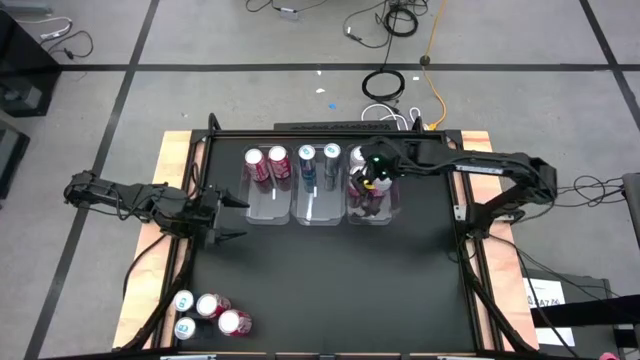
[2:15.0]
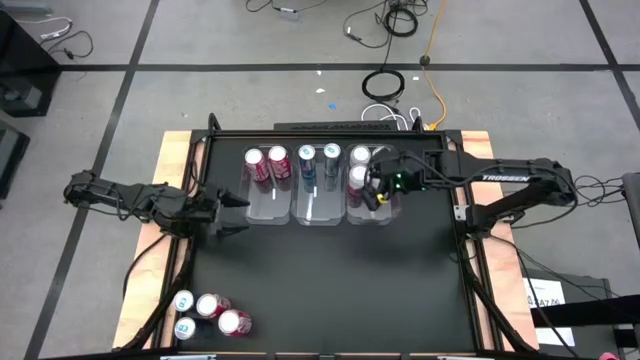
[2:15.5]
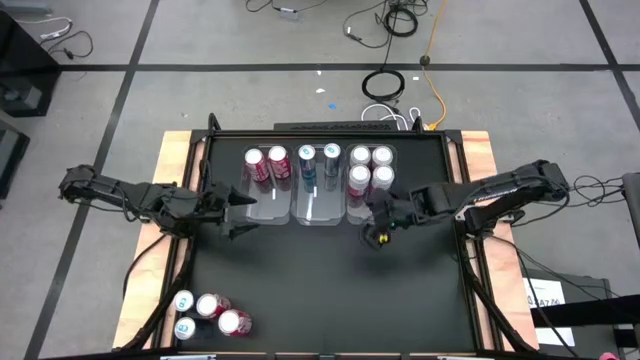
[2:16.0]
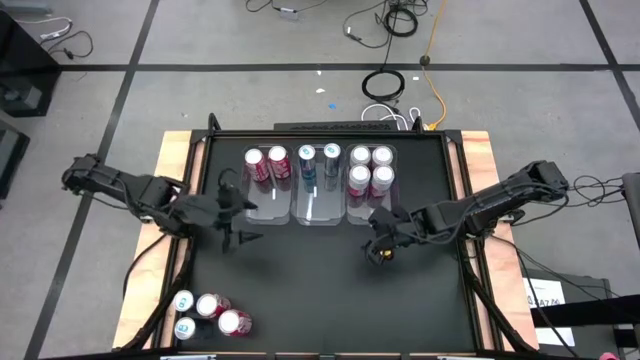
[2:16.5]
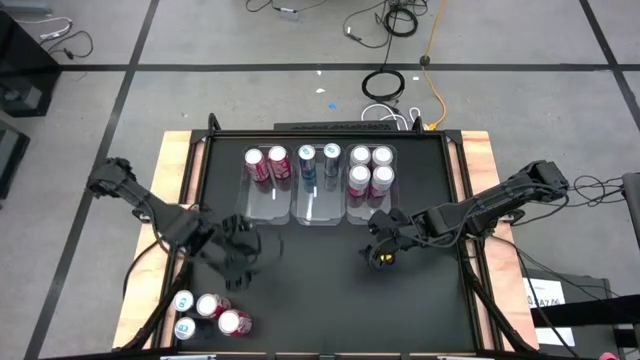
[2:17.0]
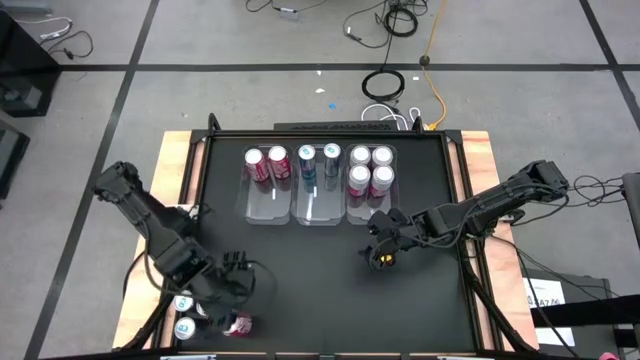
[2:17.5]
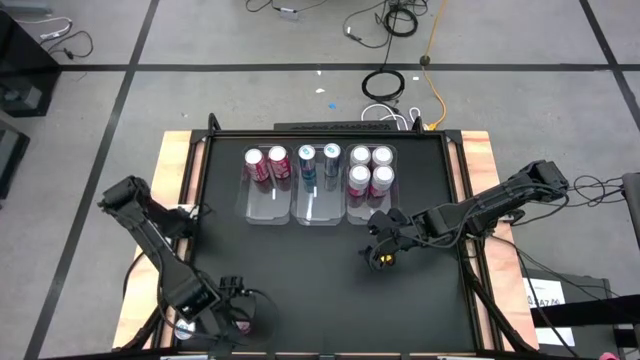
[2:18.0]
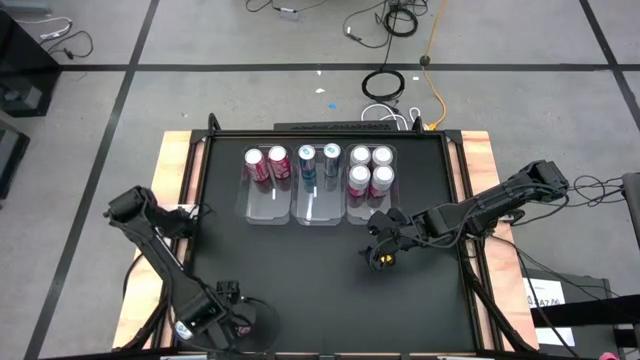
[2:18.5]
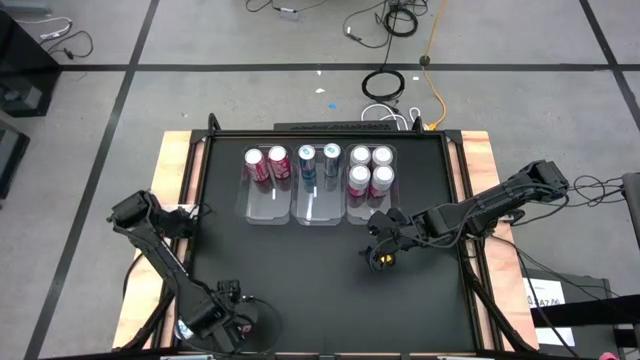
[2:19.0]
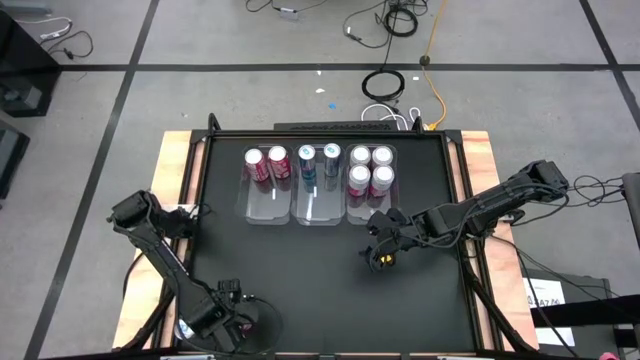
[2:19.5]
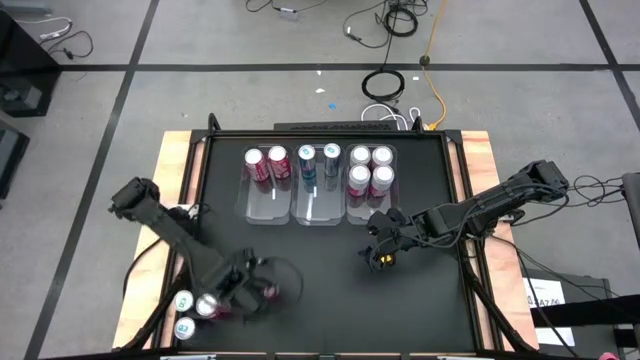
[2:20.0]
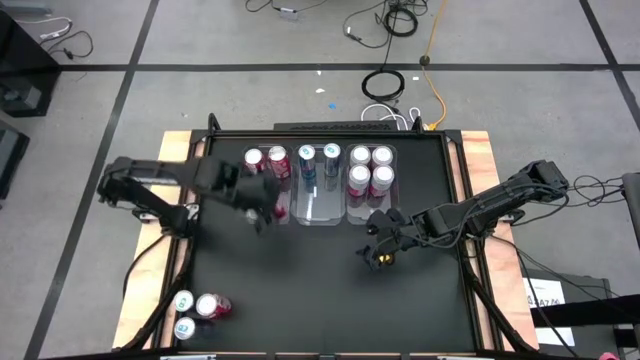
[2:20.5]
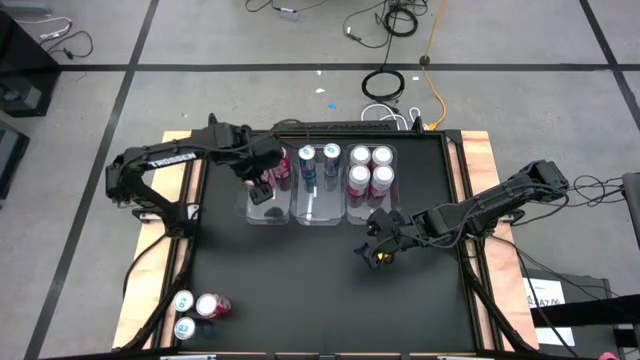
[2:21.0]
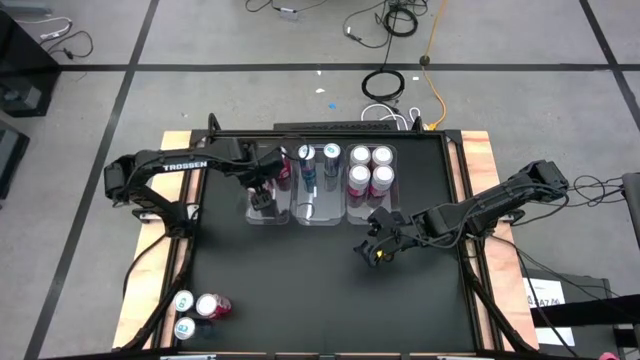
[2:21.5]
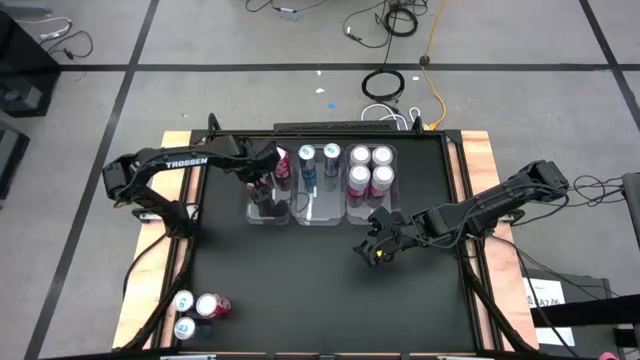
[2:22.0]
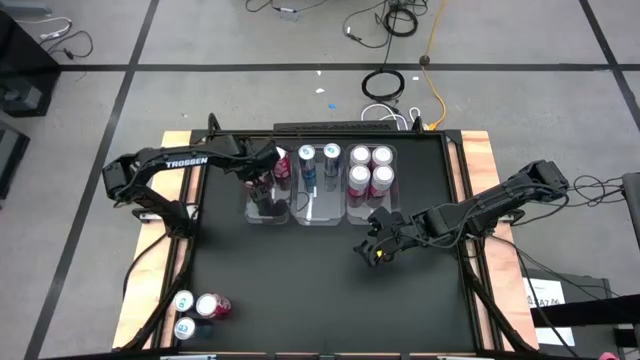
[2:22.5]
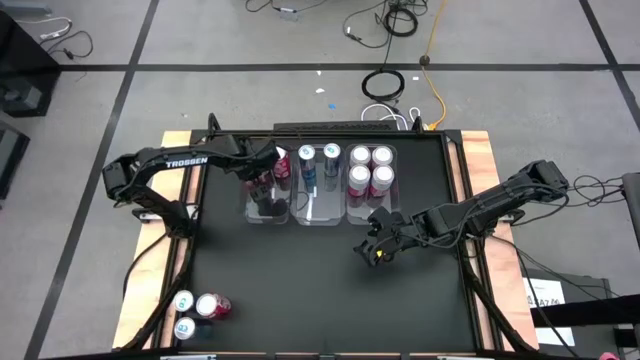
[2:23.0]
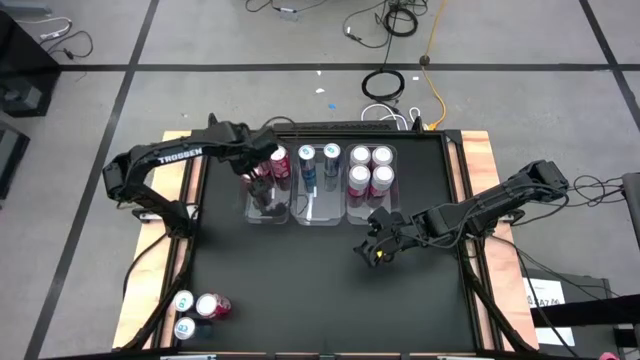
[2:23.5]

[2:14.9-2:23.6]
Task: Sort soda cans
Put the red soda can into the left transparent bin

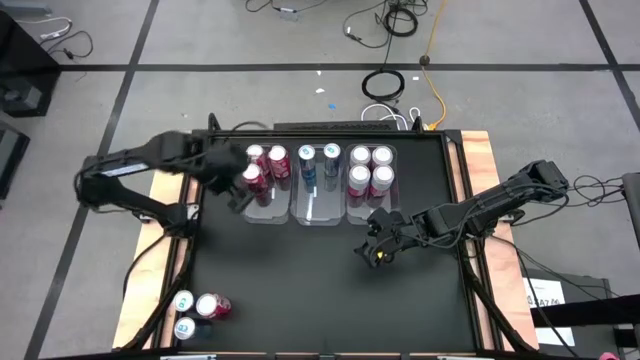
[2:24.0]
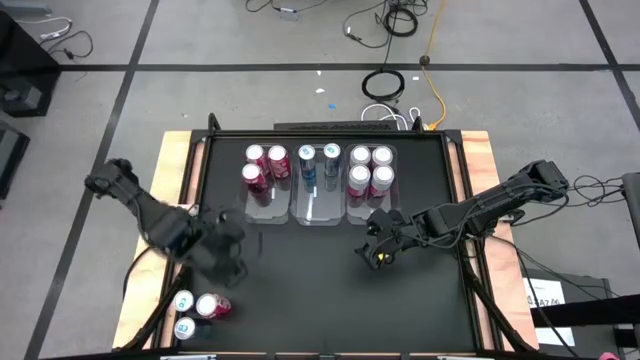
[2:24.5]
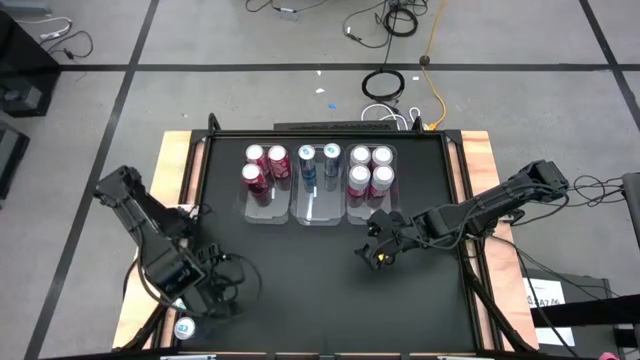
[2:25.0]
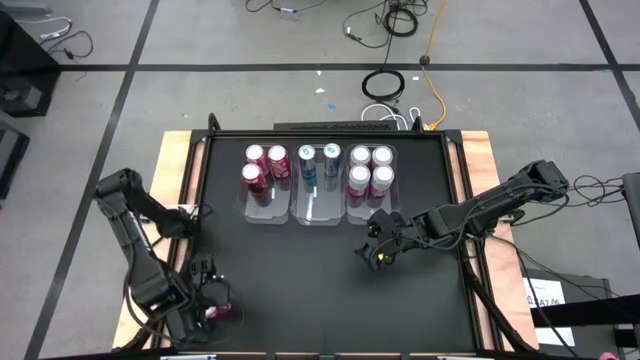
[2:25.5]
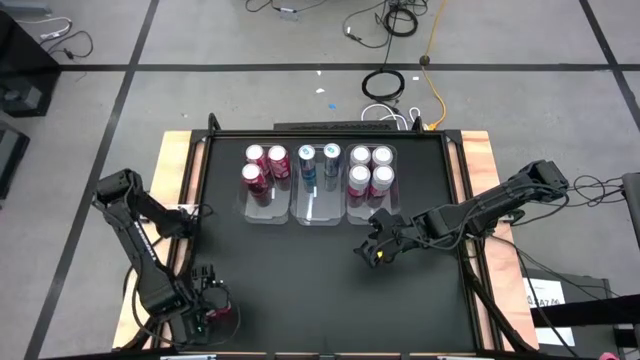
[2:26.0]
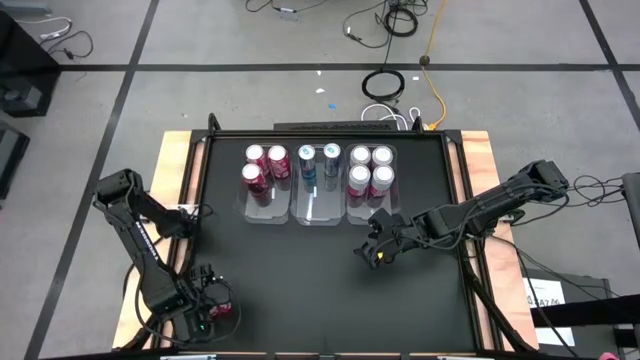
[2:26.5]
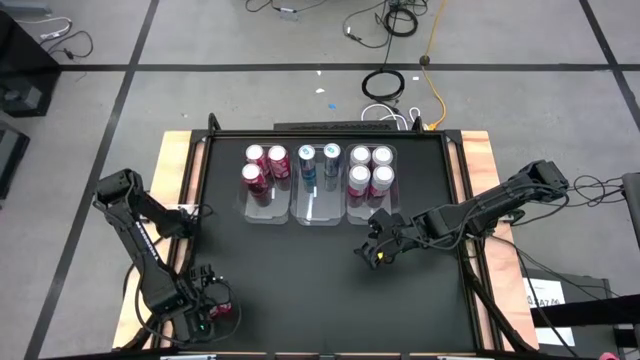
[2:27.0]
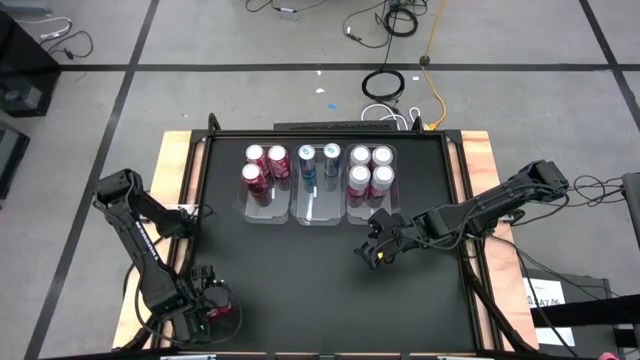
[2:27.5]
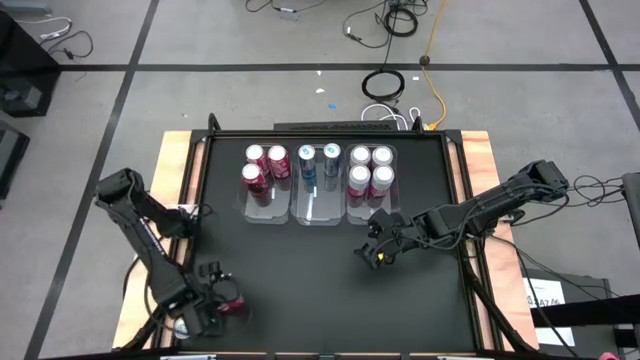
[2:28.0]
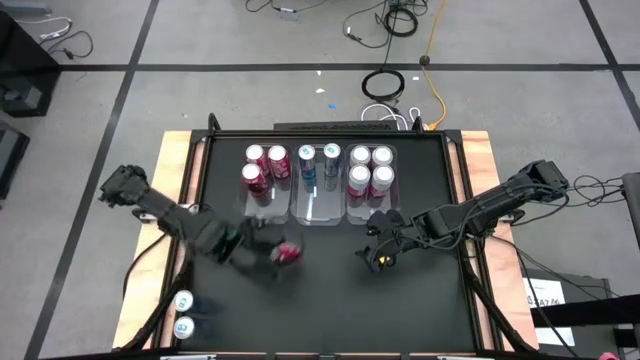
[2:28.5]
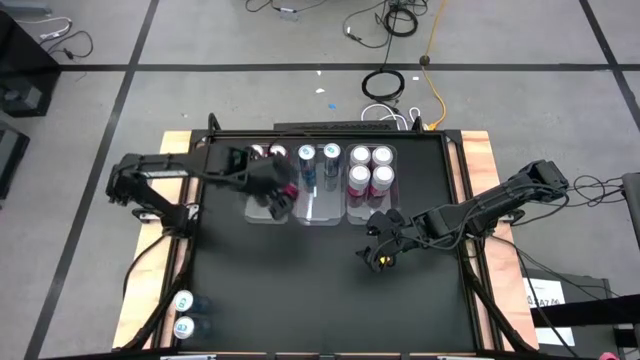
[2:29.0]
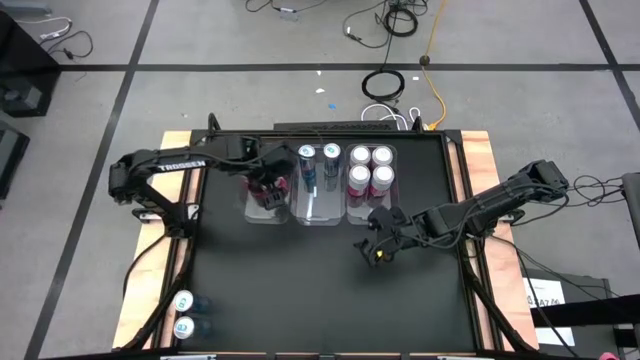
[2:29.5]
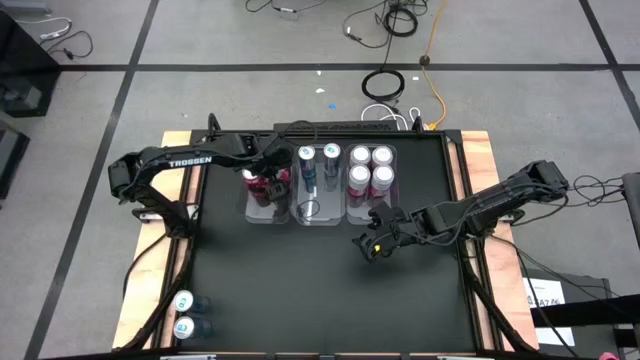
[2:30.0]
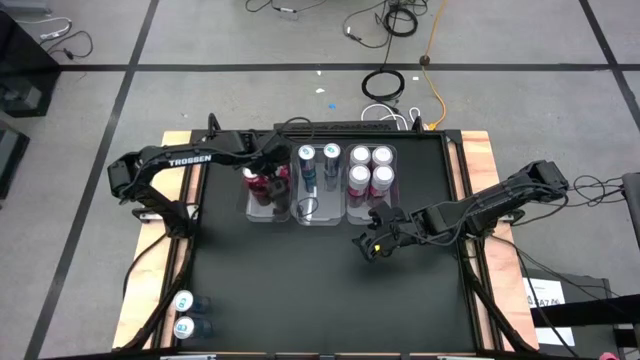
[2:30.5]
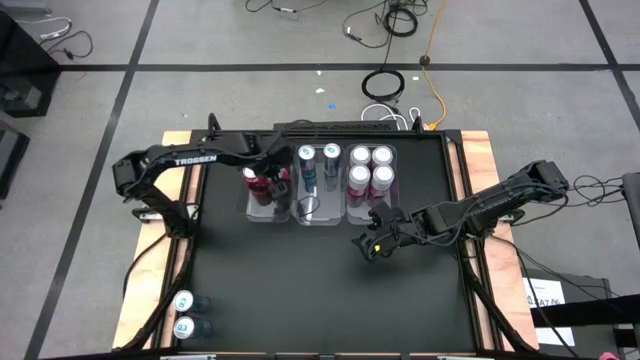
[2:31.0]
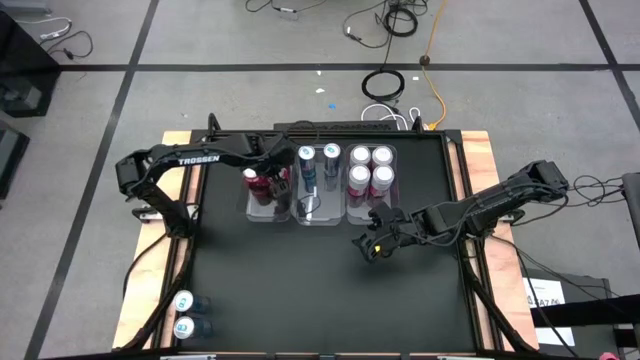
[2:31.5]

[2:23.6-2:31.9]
Put the red soda can into the left transparent bin

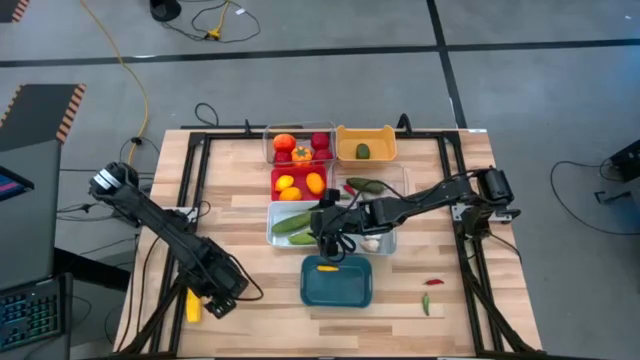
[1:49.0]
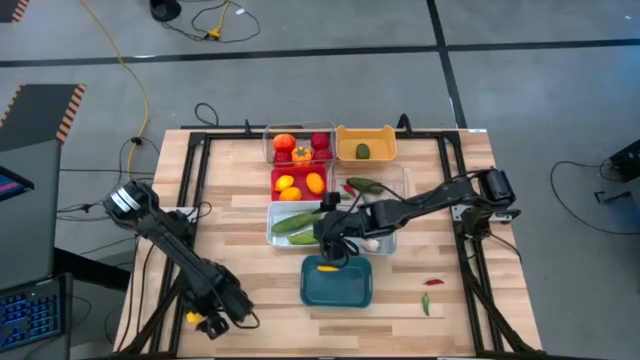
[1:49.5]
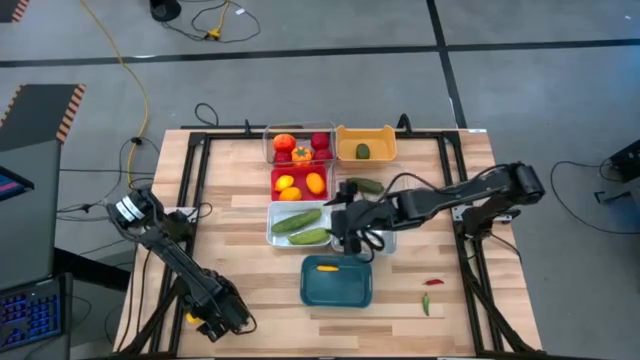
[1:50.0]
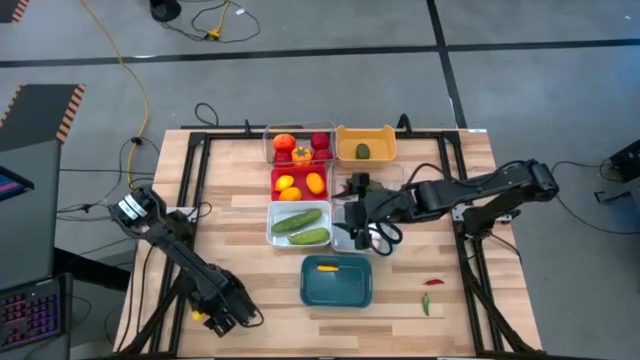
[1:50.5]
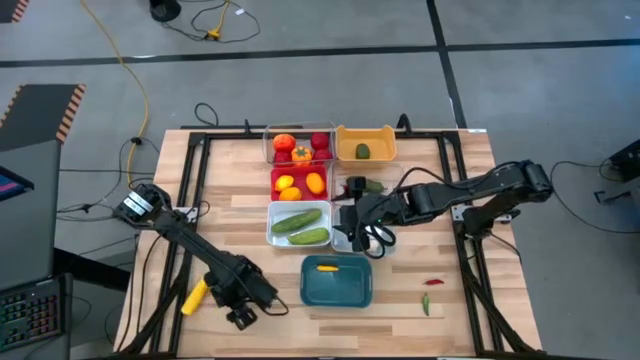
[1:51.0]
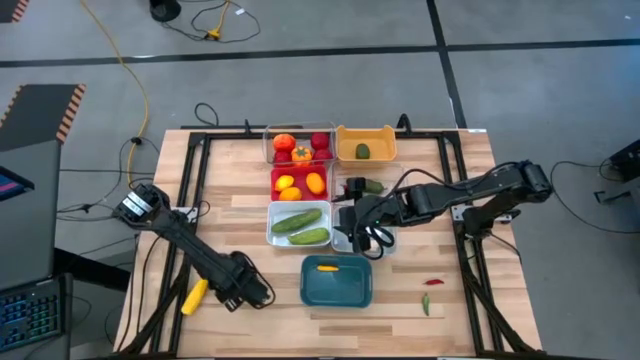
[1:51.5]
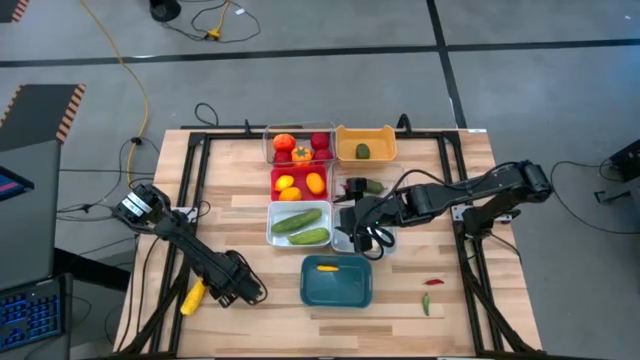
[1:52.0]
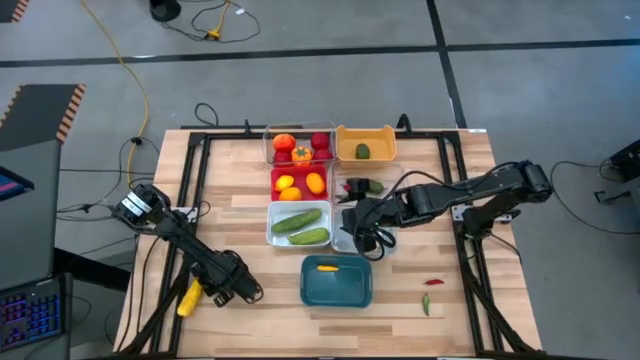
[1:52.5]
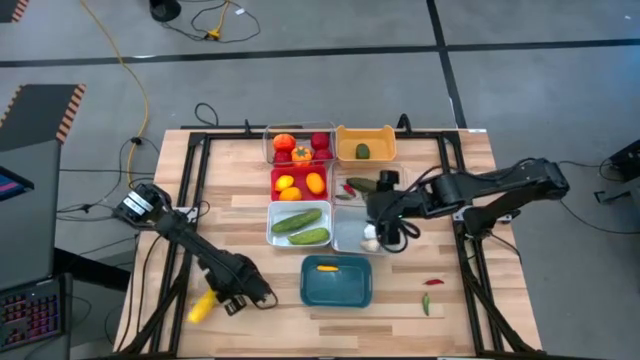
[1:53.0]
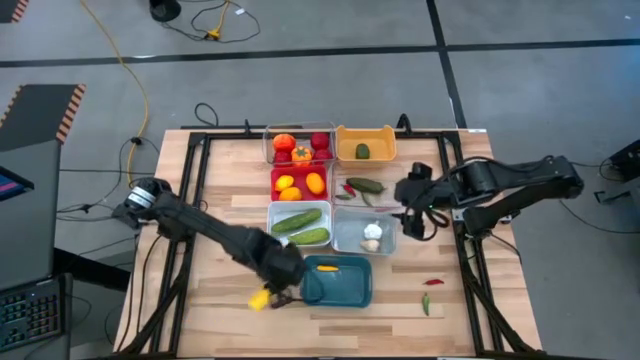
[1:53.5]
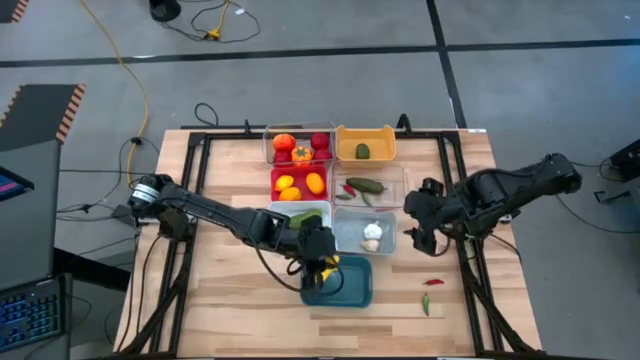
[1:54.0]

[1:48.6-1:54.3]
Task: Sort produce into baskets
Put the yellow corn into the blue bin
